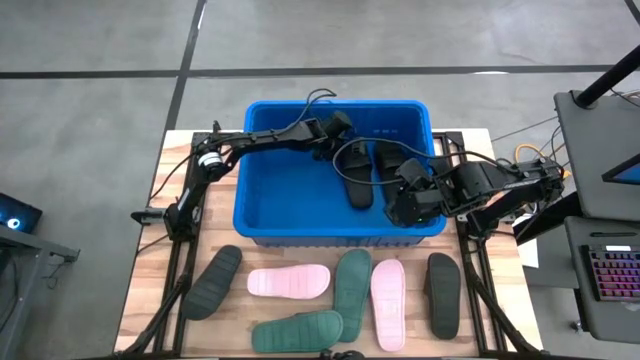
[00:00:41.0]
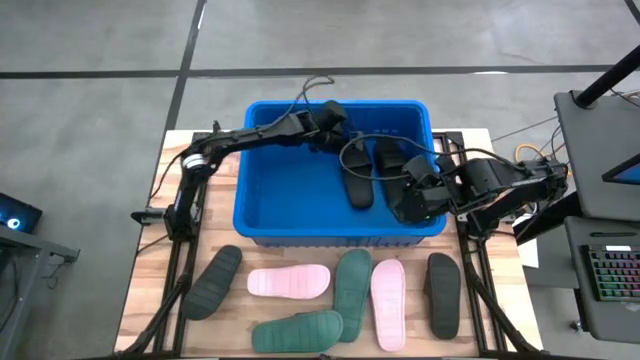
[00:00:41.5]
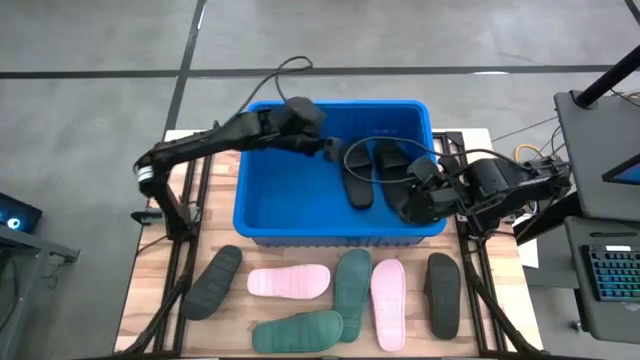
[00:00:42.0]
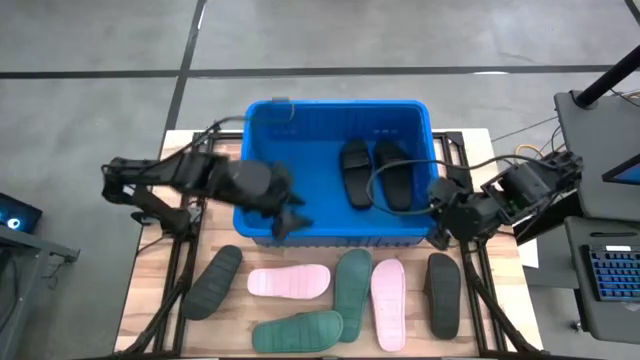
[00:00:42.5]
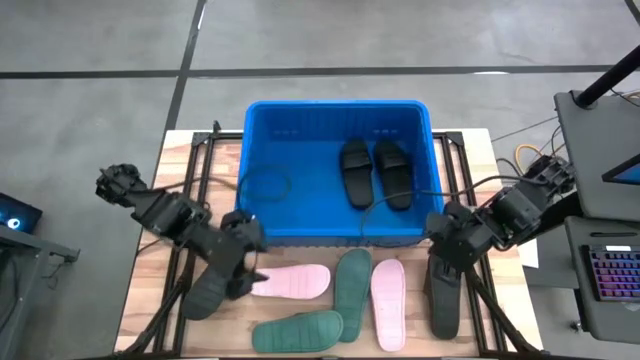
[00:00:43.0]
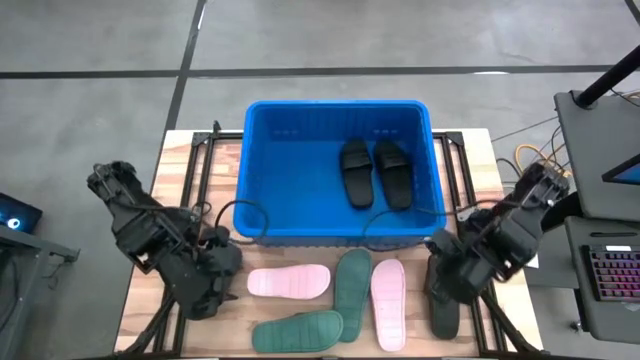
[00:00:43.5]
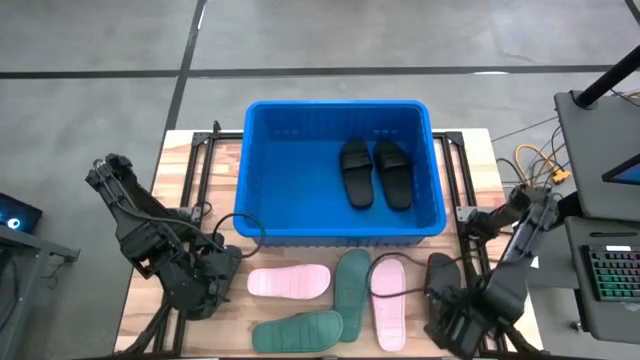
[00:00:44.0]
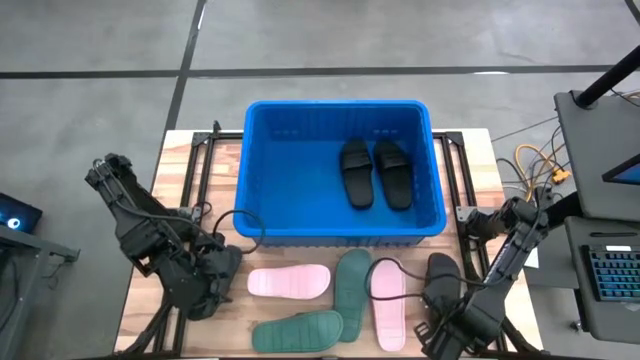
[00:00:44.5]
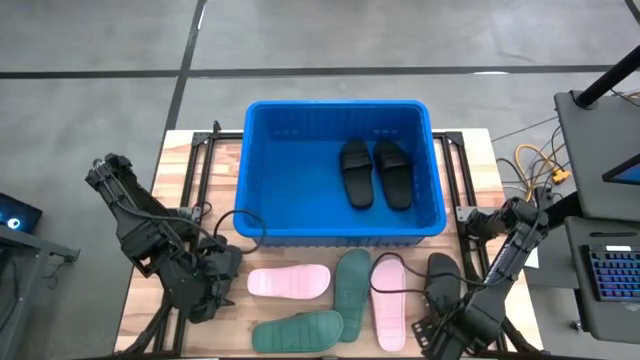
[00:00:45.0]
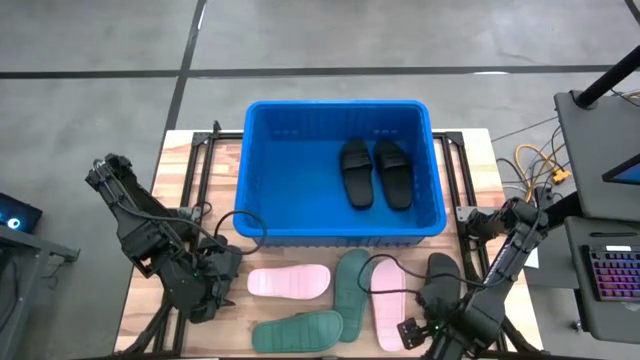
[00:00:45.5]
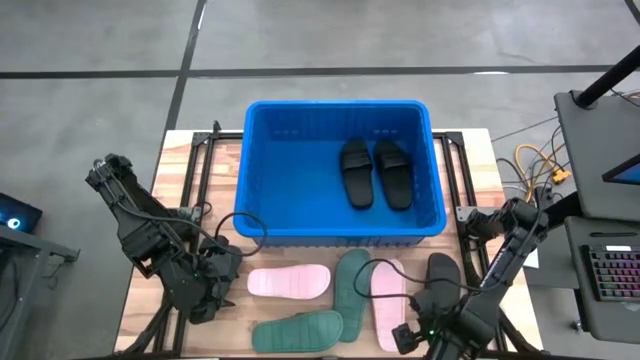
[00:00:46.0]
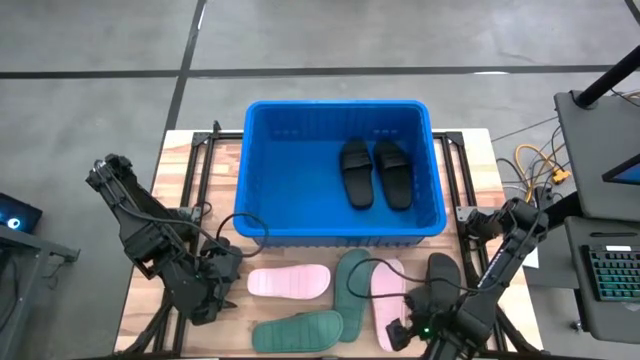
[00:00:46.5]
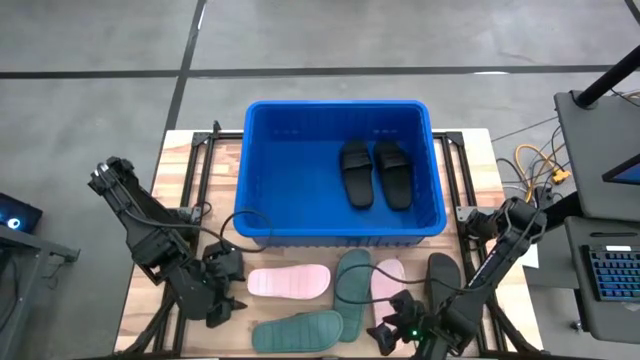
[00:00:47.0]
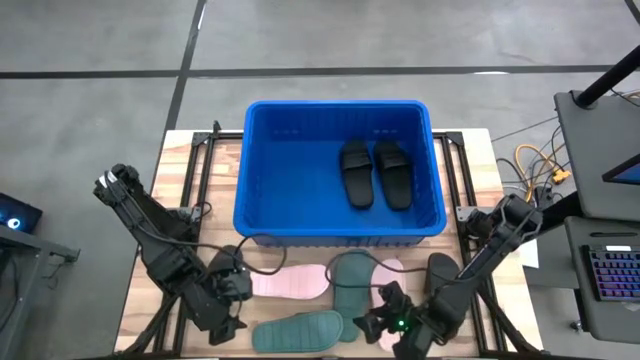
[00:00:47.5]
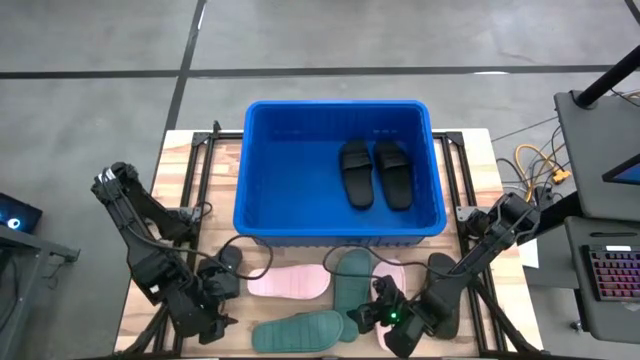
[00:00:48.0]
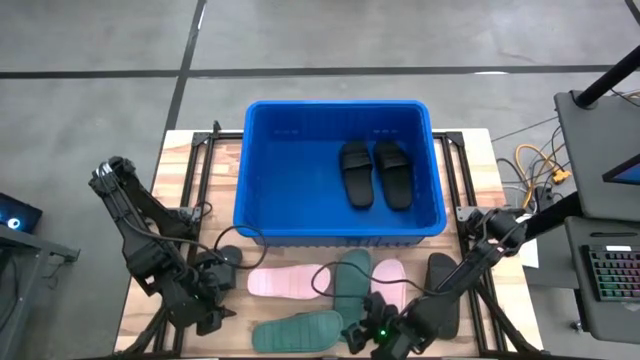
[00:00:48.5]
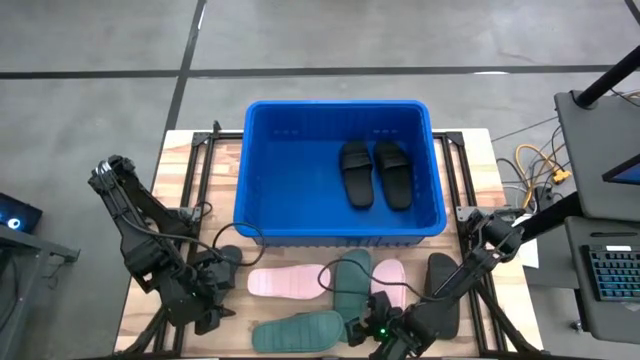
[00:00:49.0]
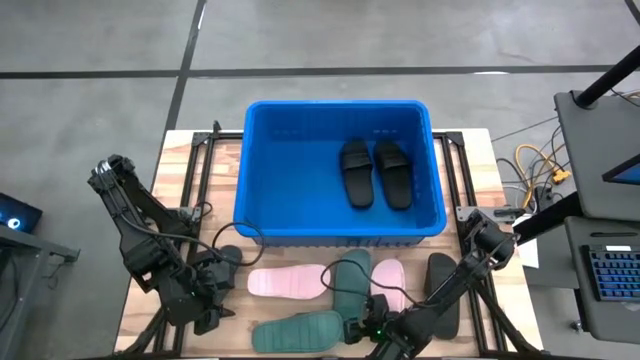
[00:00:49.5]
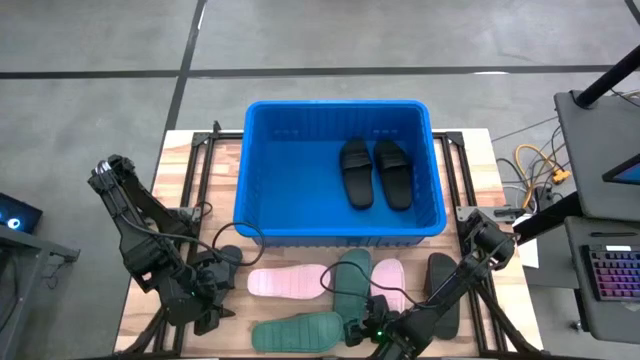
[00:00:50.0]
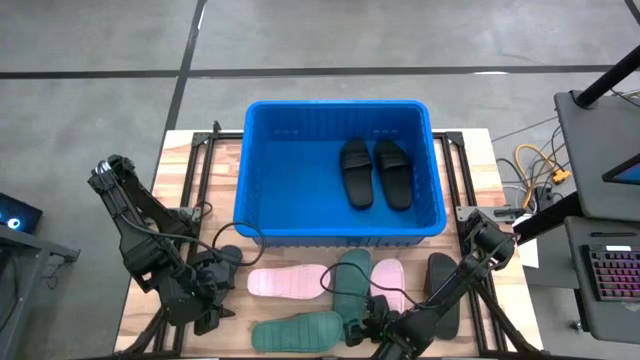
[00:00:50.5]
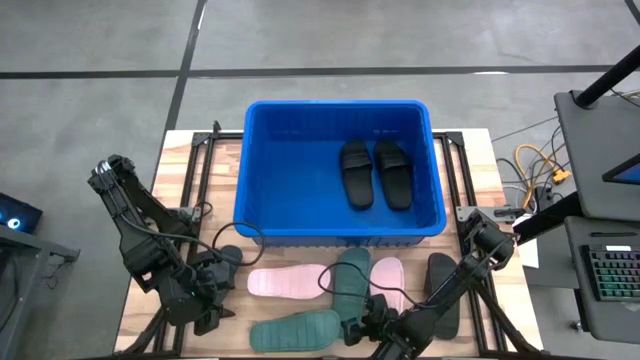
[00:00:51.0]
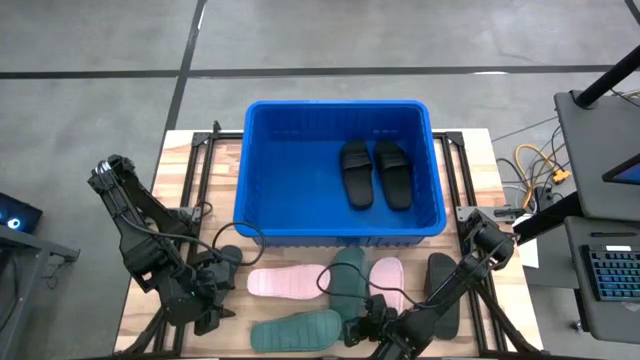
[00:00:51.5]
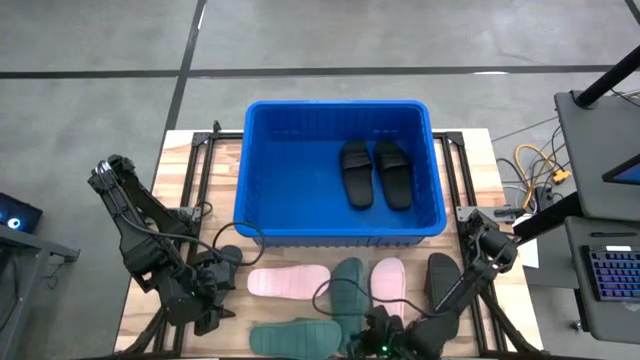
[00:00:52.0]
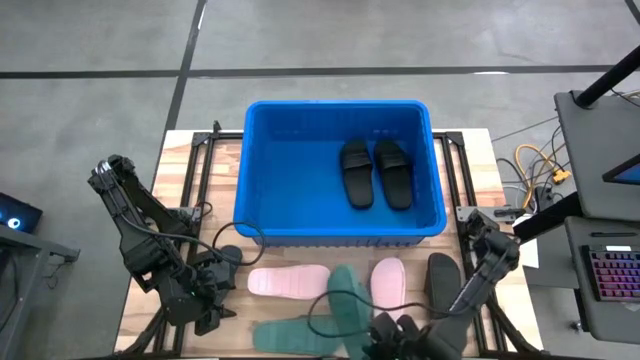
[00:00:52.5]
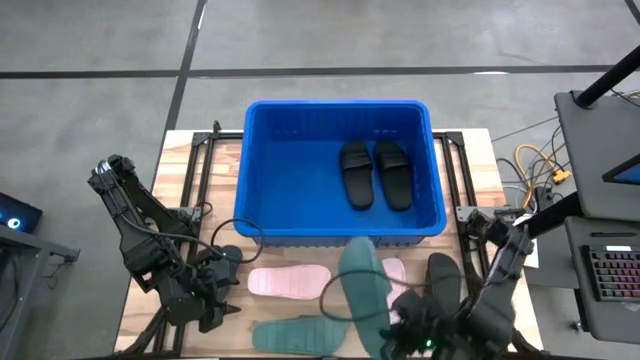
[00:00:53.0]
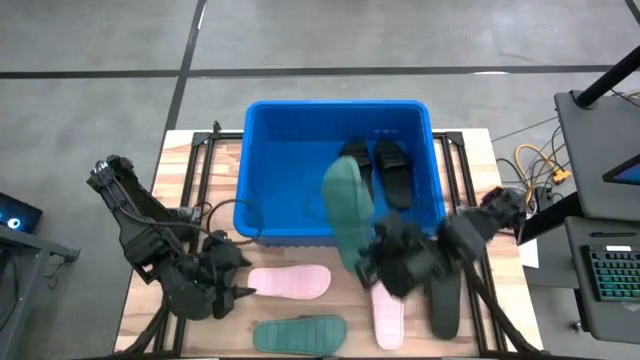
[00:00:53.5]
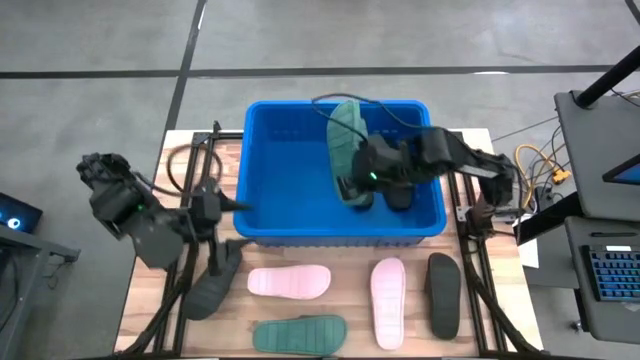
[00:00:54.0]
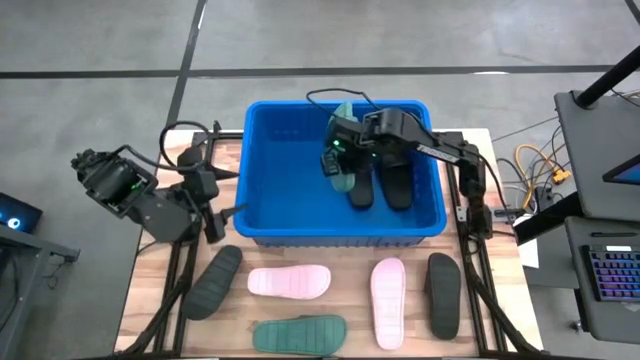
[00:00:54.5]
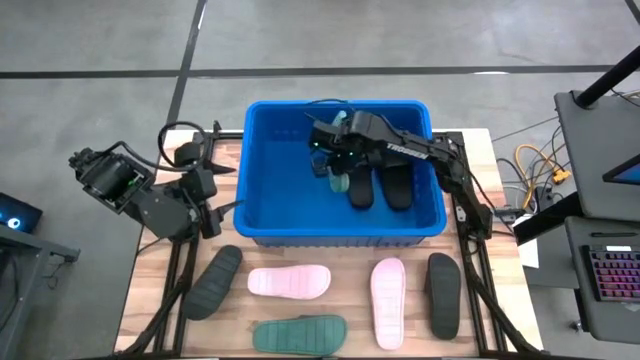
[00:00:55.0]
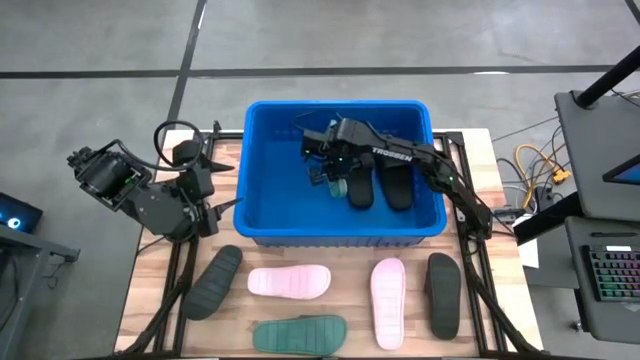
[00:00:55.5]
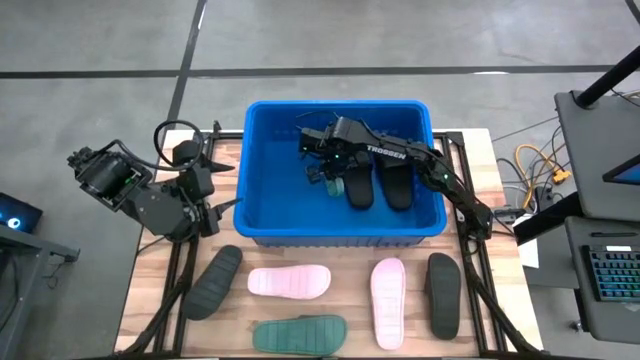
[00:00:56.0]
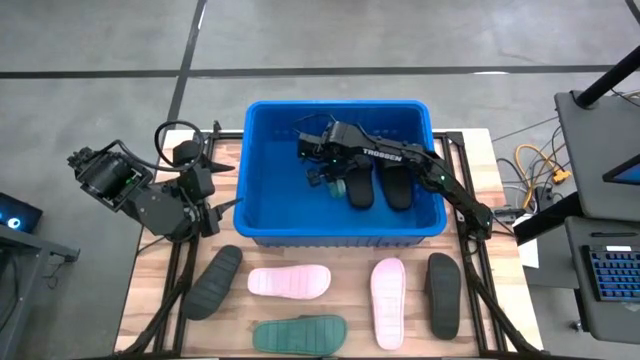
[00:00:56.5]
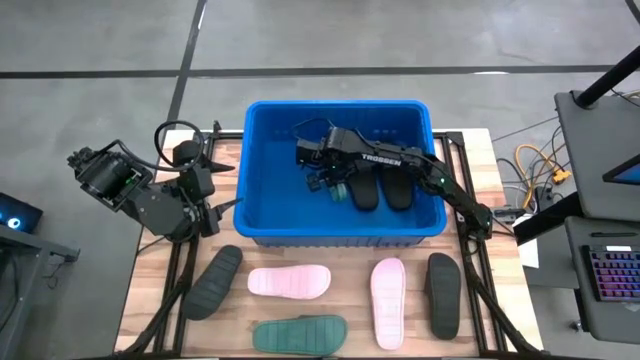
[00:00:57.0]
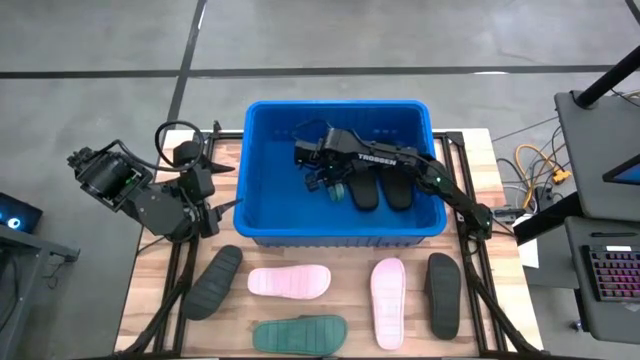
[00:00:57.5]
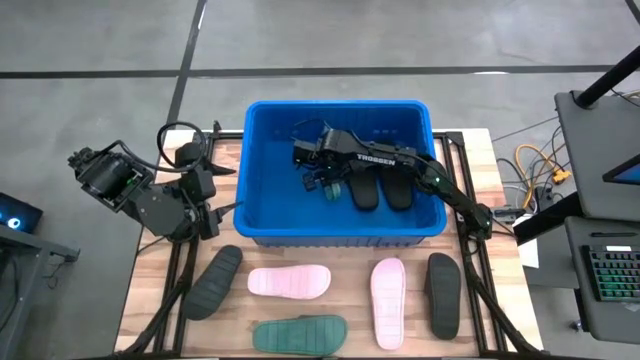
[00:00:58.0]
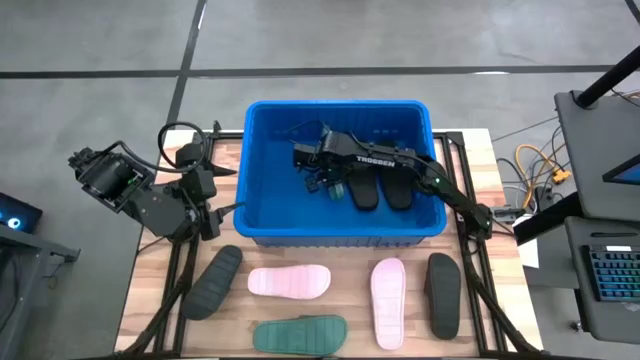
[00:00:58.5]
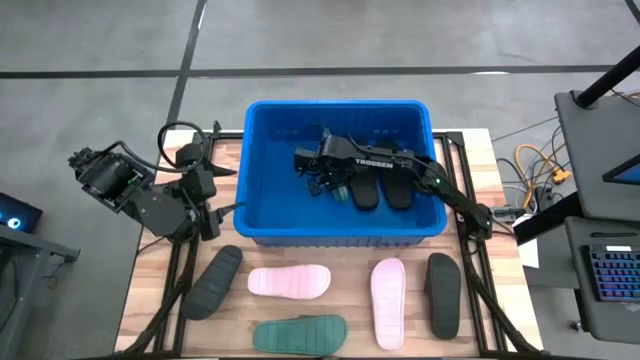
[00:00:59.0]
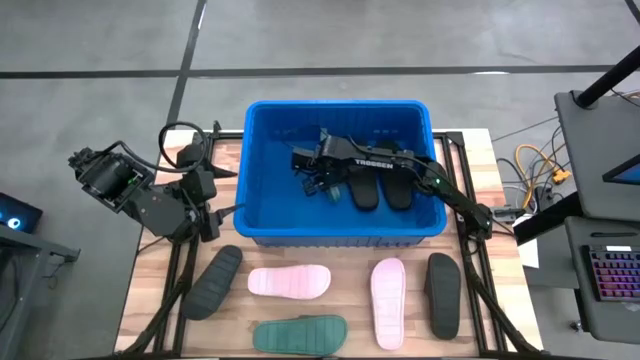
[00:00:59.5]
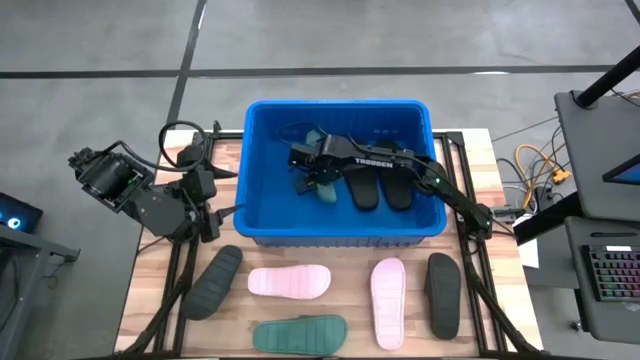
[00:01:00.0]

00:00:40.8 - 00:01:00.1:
Task: Pick and place slides into bin
Put the right green slide into the bin
